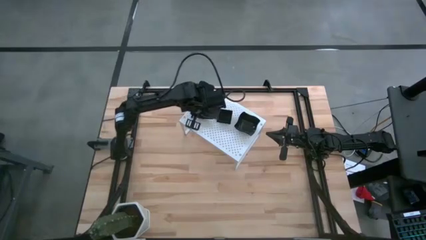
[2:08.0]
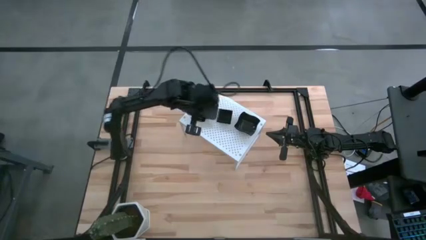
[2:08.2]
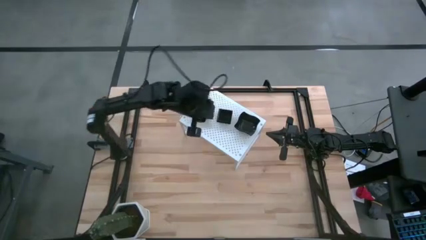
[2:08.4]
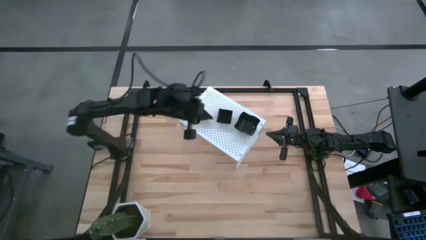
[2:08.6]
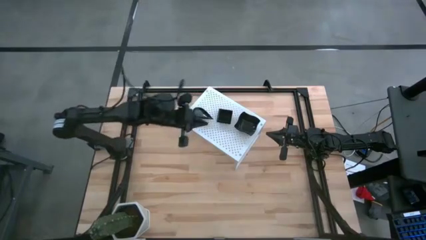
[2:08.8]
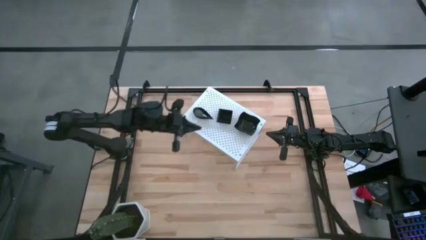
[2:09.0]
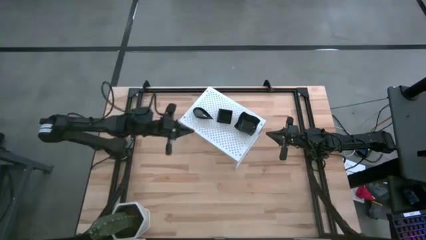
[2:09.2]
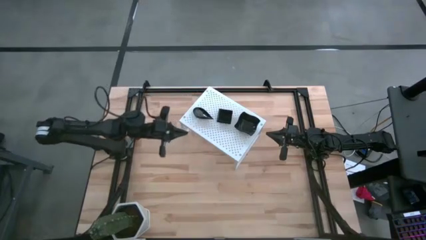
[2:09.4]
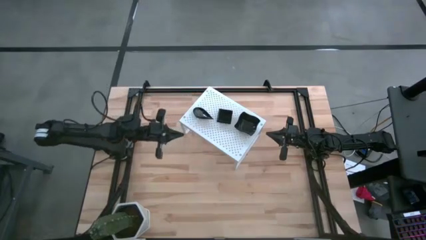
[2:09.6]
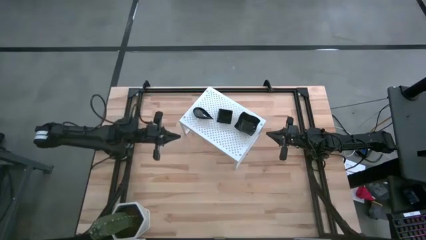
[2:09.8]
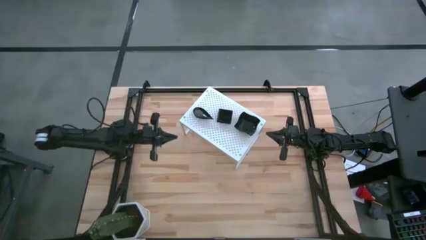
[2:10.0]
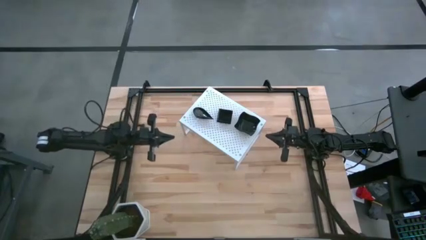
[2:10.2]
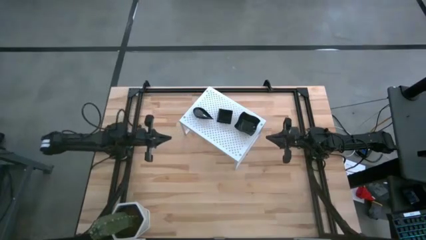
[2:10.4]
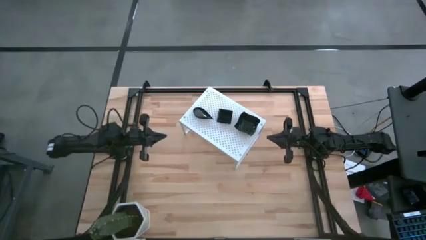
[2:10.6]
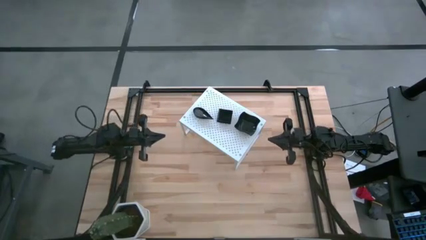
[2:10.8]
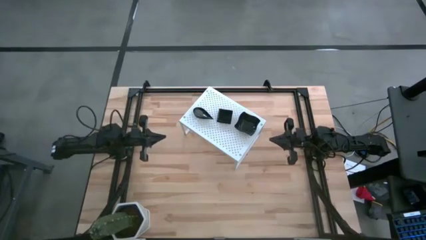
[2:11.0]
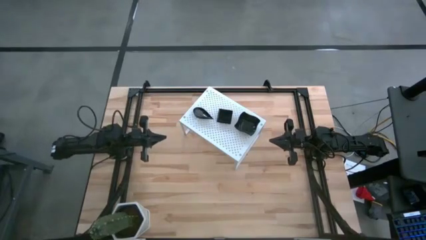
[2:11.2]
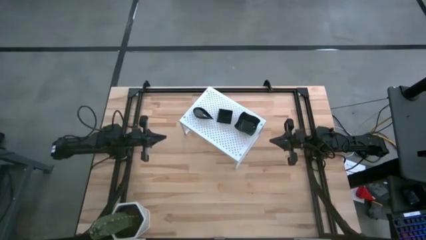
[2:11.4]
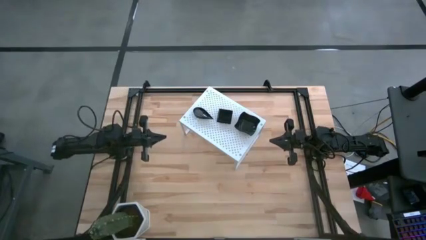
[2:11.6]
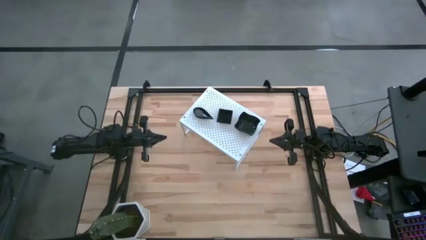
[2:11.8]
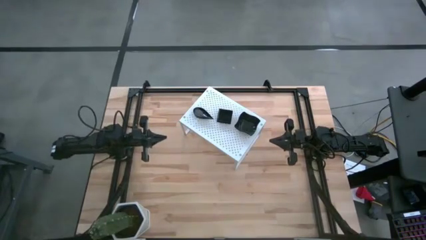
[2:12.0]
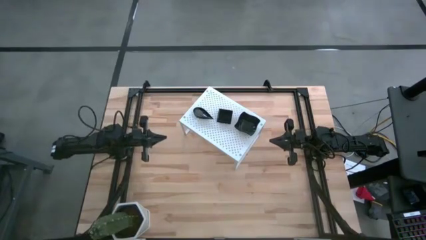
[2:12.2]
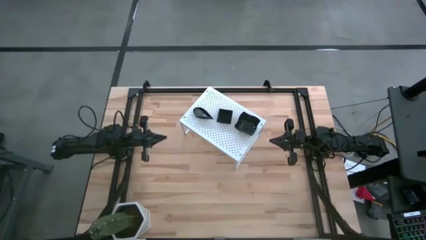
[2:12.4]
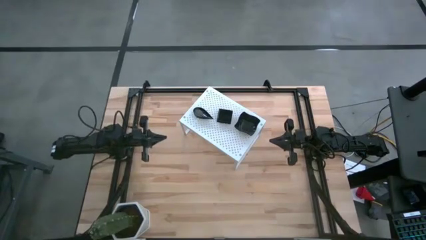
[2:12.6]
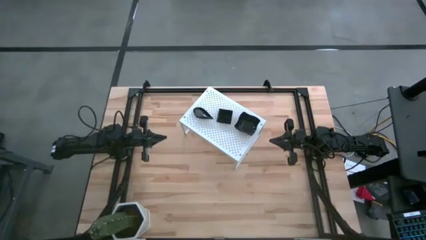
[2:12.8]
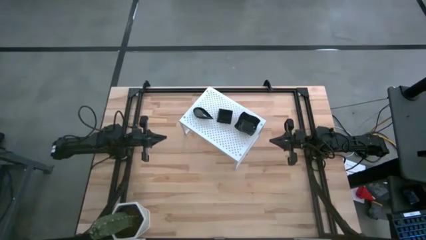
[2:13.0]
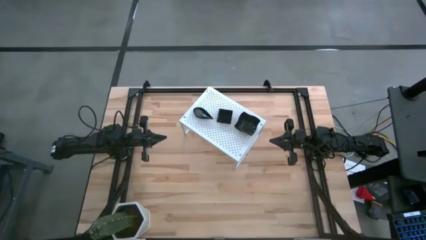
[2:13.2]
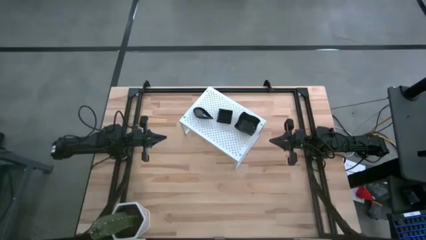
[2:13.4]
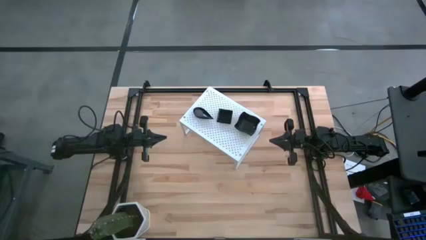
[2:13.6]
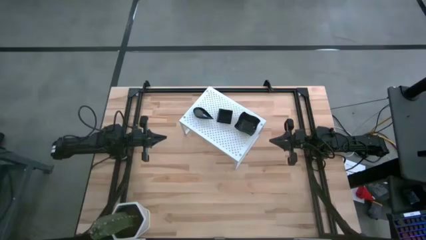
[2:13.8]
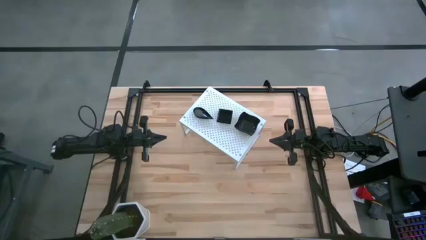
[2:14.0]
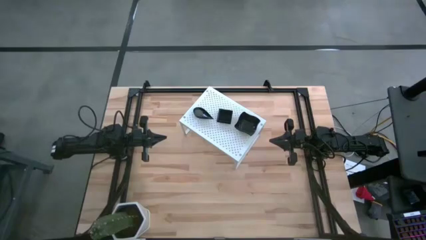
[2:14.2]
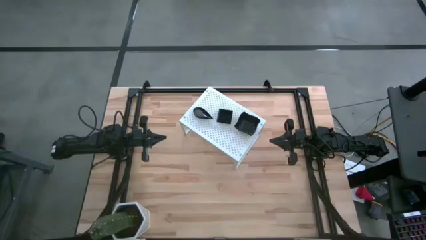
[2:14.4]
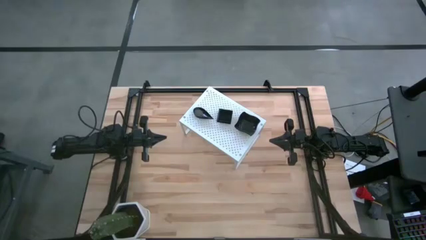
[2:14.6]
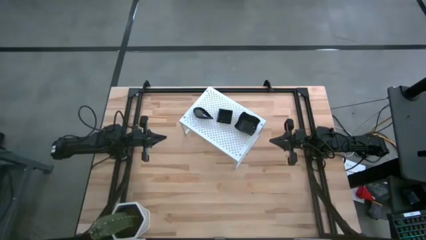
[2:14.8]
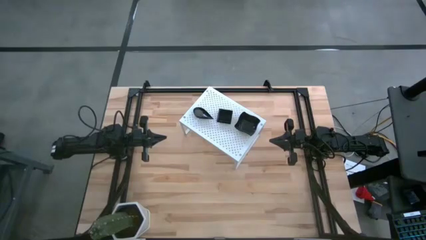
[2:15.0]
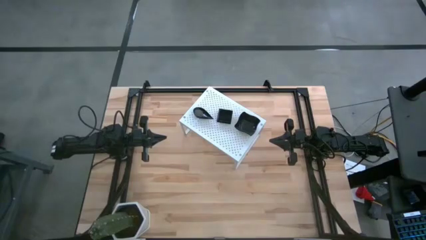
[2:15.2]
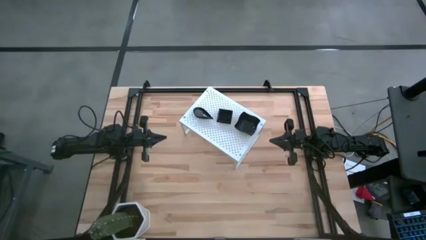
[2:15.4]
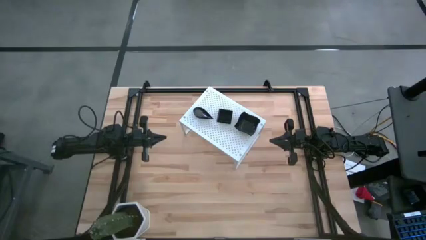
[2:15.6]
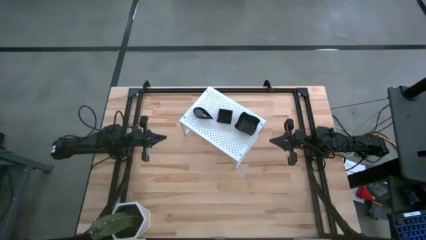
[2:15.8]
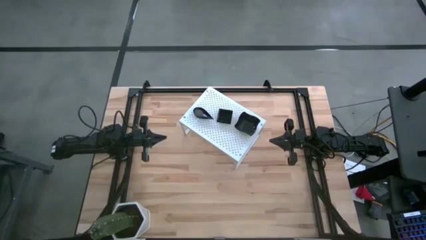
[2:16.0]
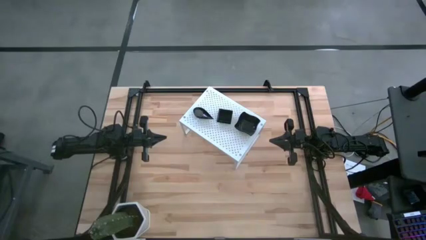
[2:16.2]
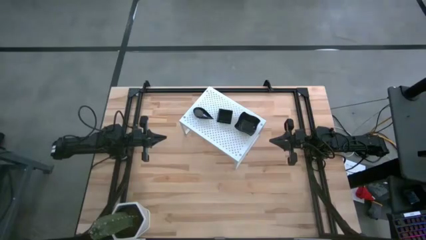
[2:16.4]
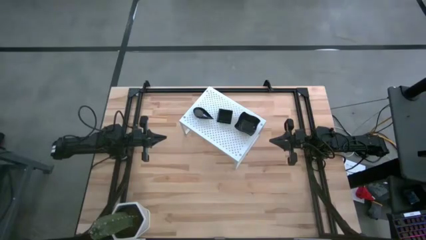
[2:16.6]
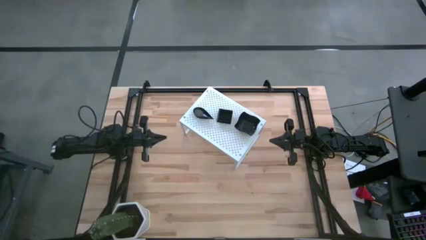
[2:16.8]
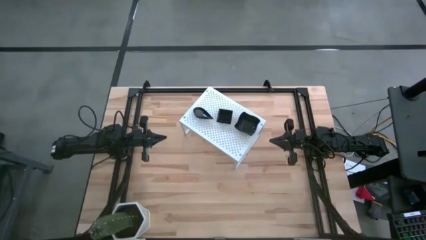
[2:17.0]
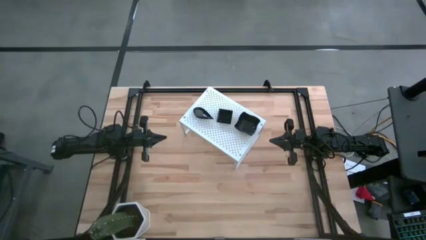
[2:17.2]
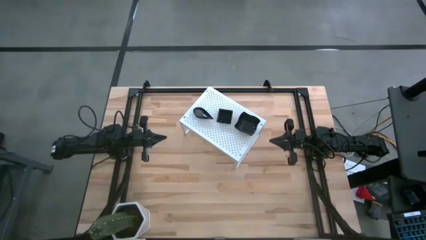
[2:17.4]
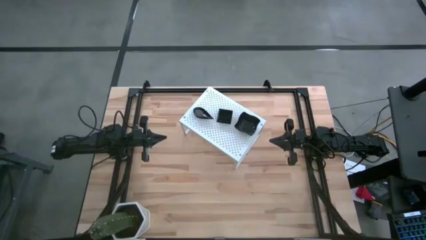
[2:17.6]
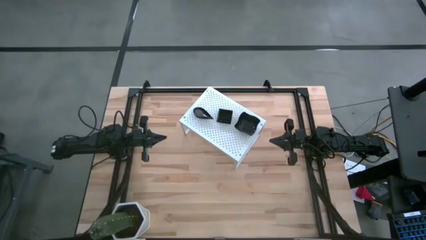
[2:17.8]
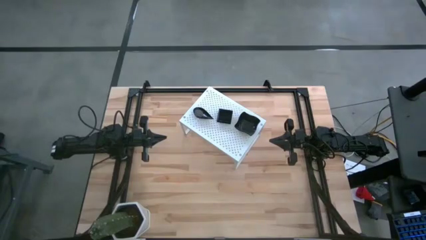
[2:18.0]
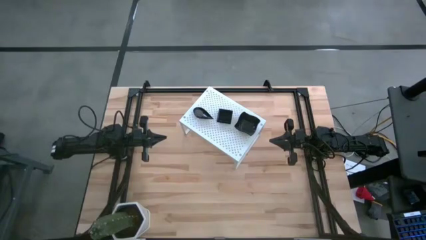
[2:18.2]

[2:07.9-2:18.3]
Task: Pick & Place Mini shaped plates
Return to Home Position

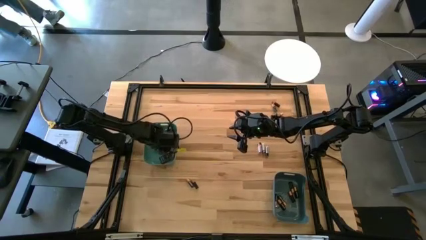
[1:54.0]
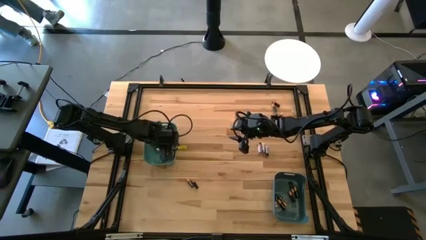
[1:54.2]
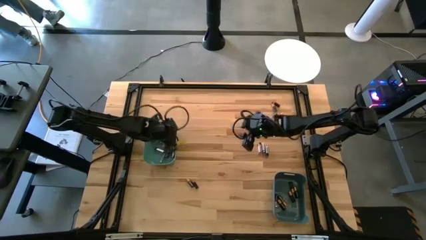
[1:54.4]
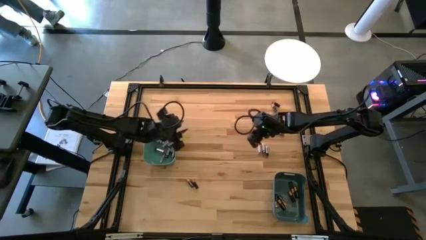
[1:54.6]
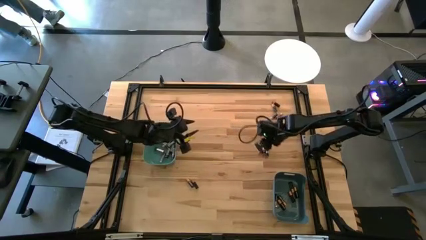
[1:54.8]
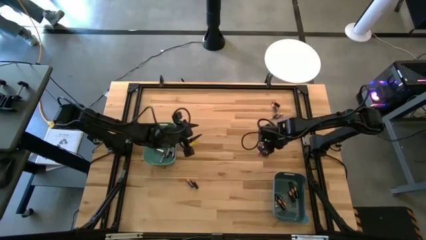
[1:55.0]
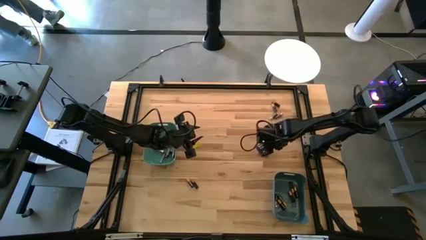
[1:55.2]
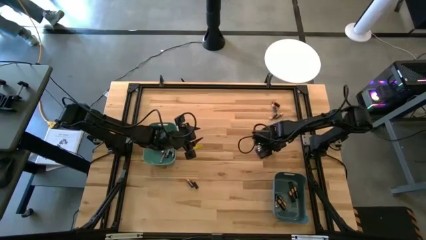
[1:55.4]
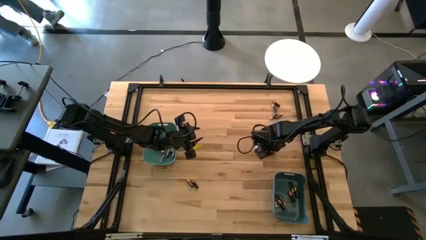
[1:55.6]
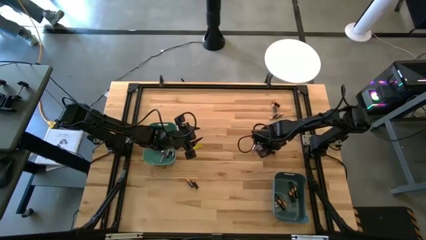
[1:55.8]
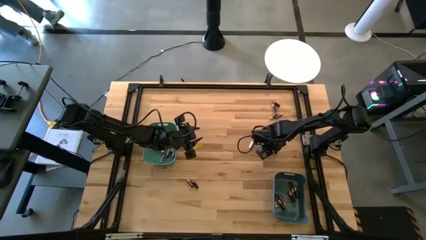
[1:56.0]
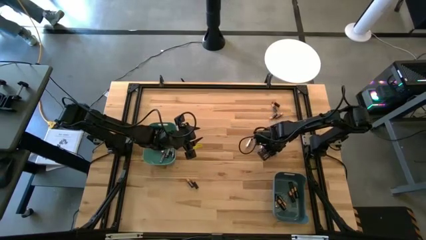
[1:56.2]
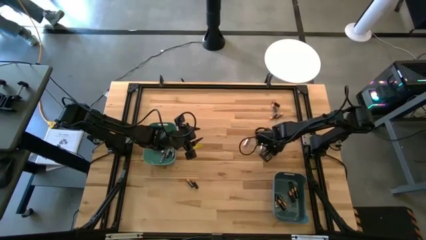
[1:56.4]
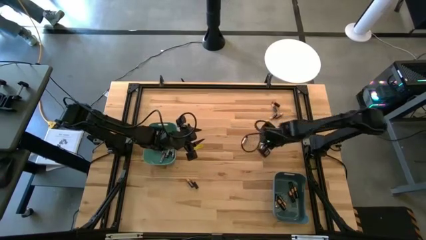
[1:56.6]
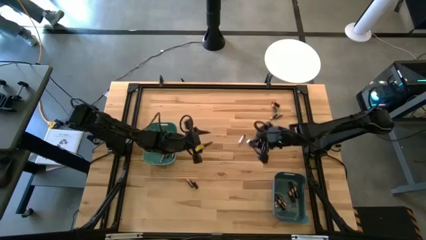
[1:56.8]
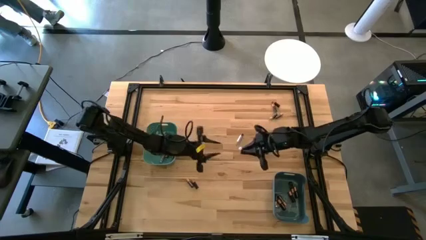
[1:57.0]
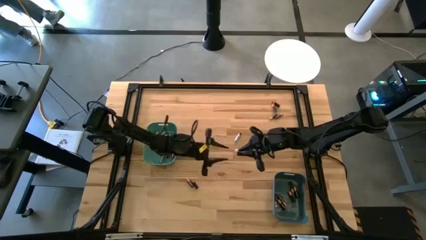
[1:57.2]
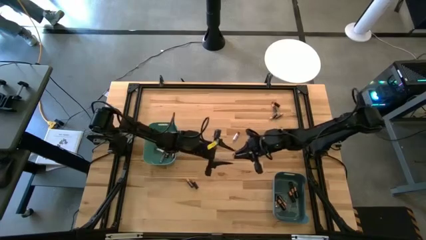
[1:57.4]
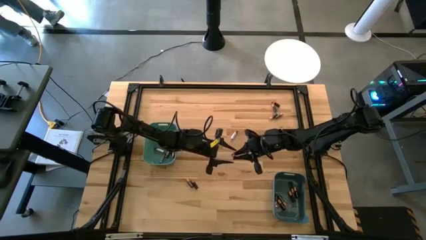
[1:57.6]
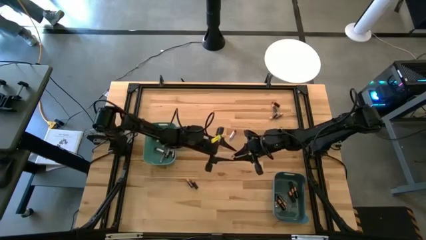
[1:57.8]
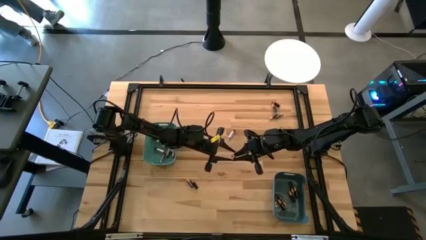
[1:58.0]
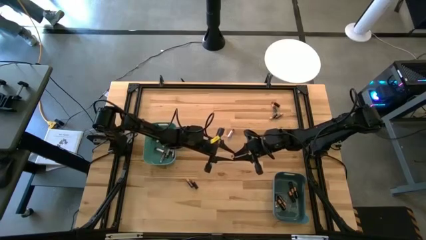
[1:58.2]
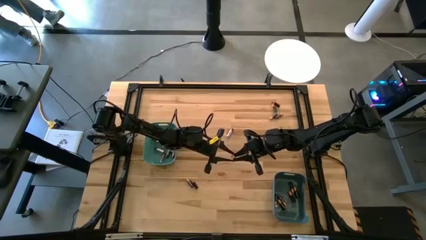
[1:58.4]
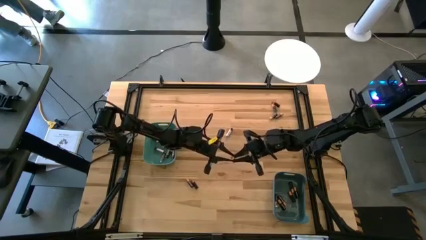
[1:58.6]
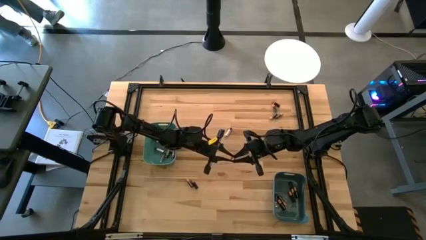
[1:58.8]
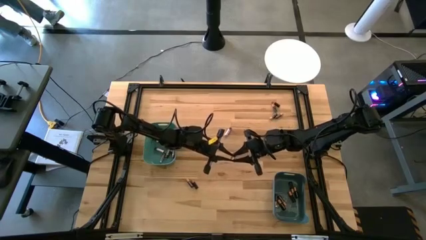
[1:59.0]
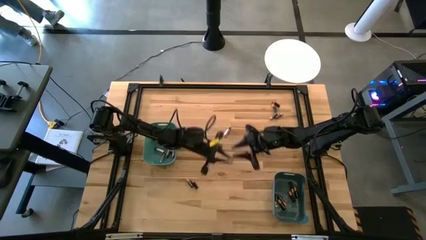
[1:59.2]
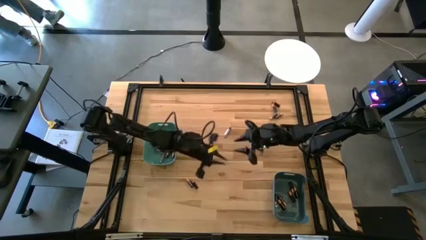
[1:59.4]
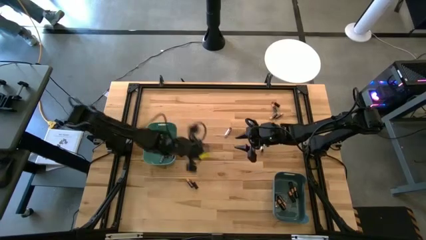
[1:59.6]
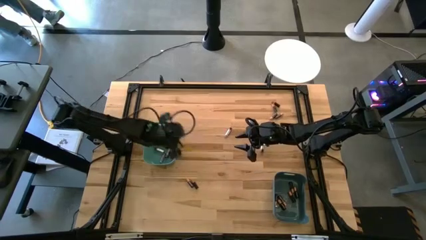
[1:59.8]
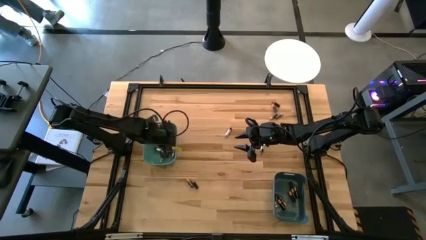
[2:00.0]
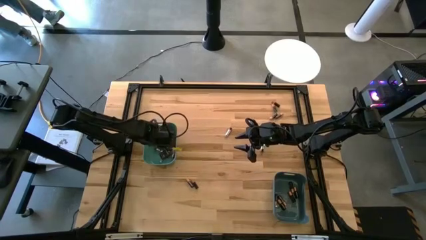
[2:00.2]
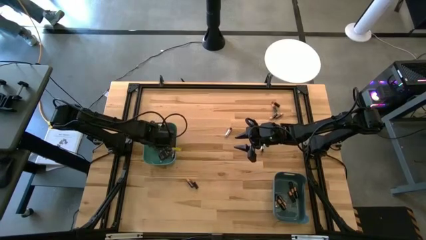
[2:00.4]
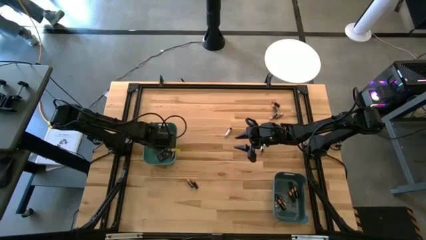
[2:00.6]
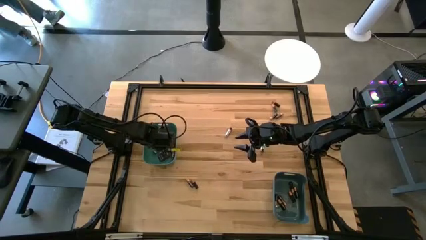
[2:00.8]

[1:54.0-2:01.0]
Task: Sort batteries
Put the silver battery into the green bin
